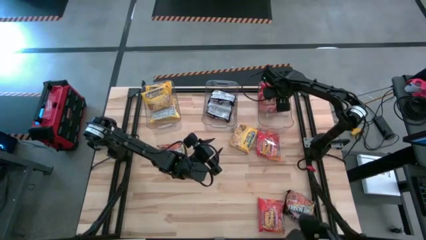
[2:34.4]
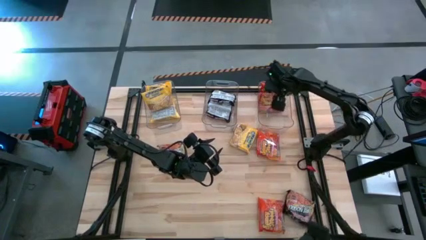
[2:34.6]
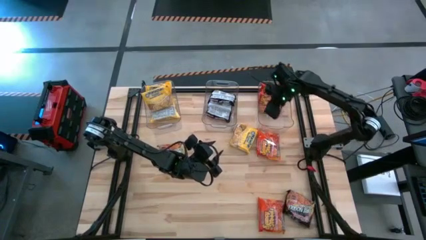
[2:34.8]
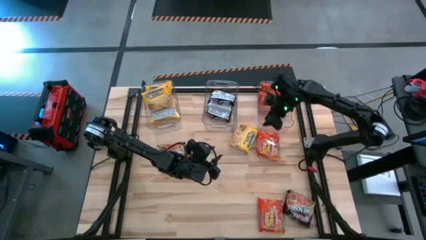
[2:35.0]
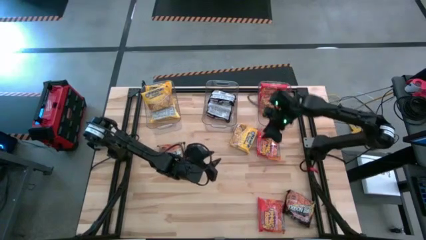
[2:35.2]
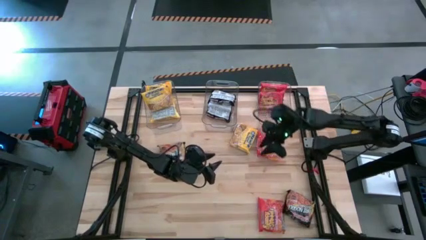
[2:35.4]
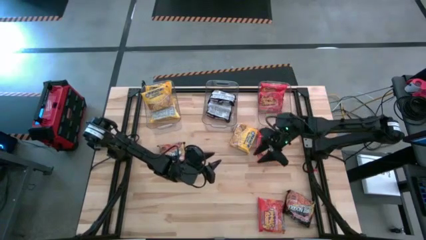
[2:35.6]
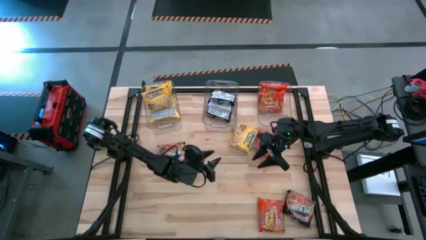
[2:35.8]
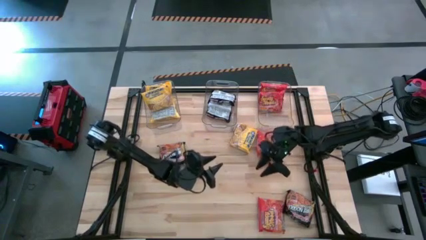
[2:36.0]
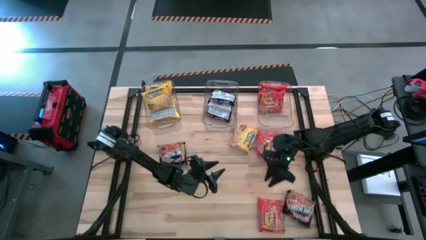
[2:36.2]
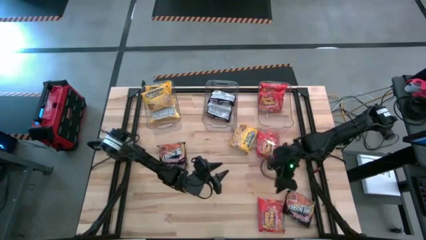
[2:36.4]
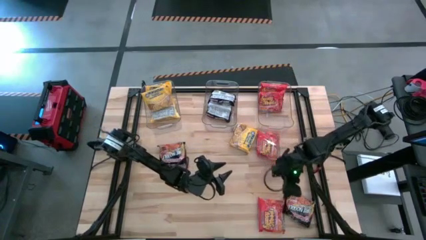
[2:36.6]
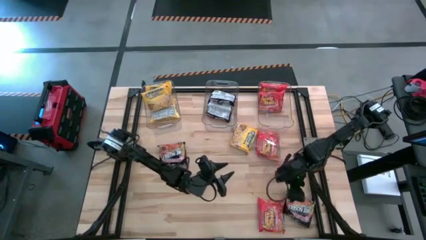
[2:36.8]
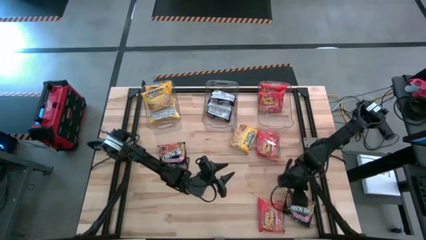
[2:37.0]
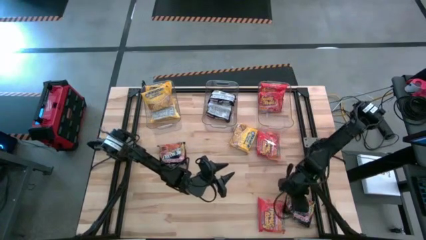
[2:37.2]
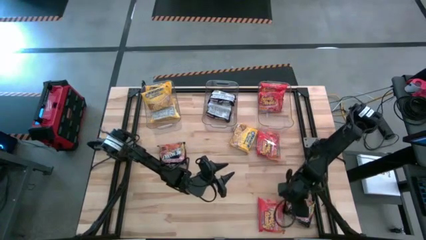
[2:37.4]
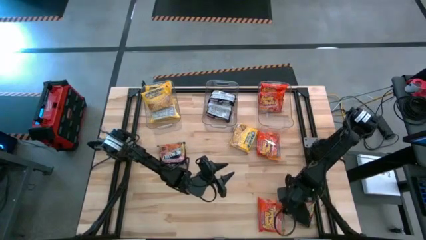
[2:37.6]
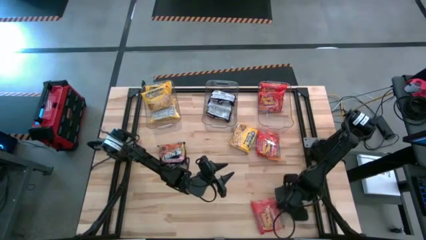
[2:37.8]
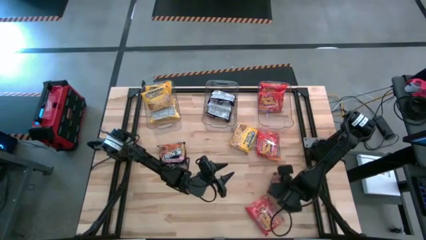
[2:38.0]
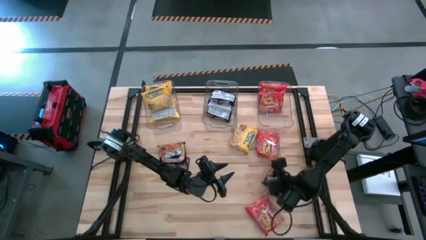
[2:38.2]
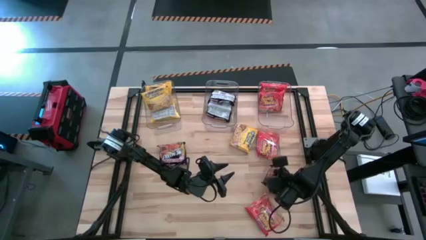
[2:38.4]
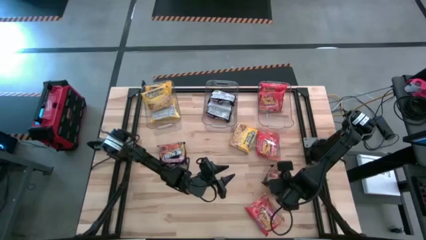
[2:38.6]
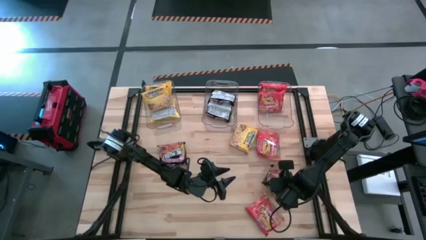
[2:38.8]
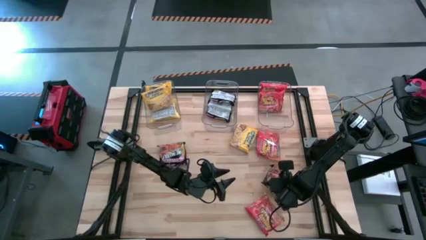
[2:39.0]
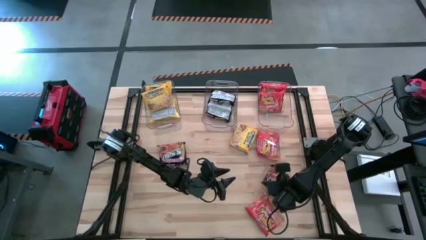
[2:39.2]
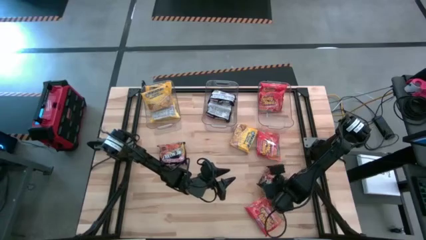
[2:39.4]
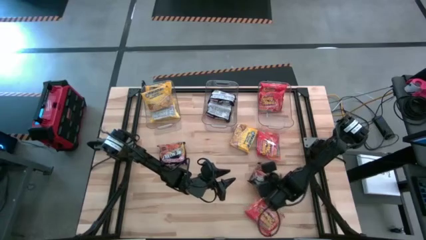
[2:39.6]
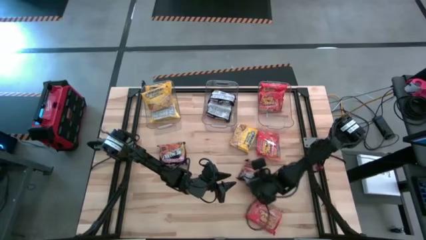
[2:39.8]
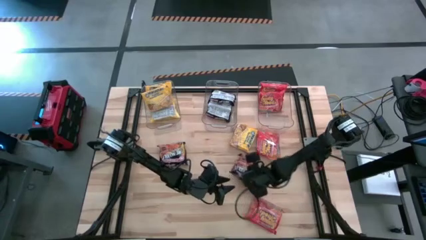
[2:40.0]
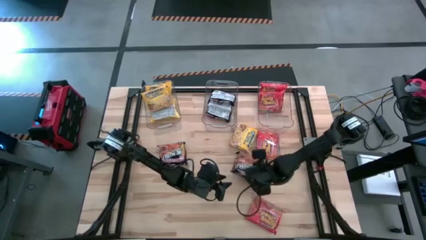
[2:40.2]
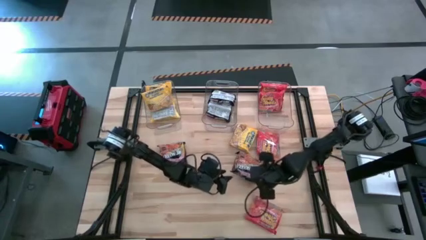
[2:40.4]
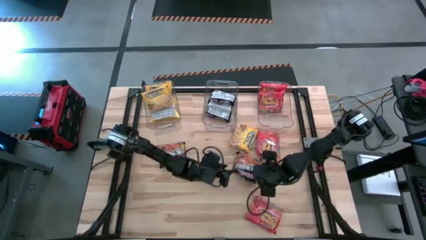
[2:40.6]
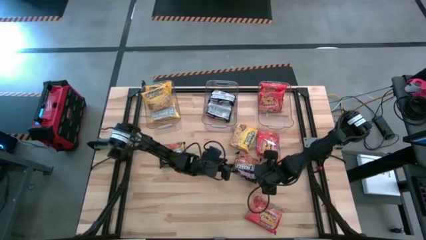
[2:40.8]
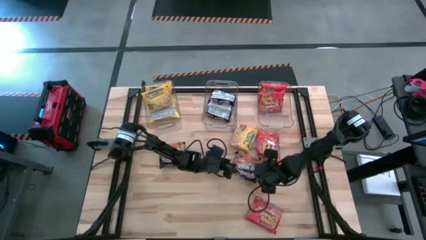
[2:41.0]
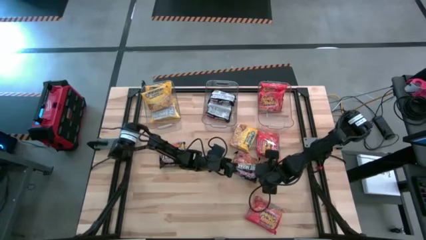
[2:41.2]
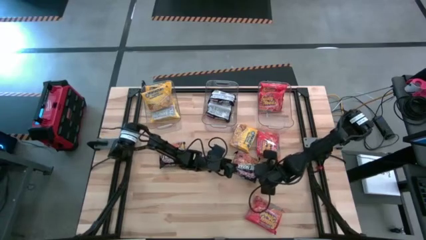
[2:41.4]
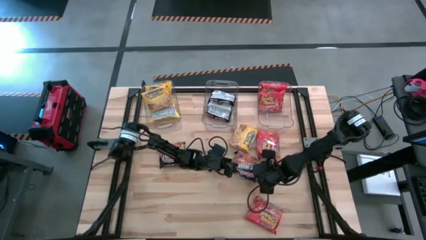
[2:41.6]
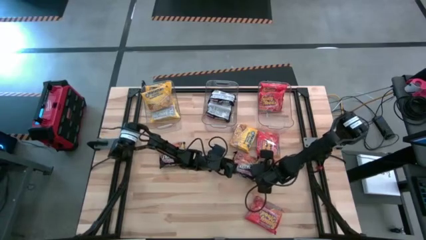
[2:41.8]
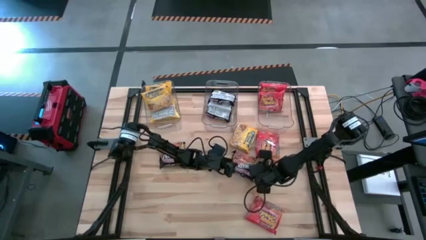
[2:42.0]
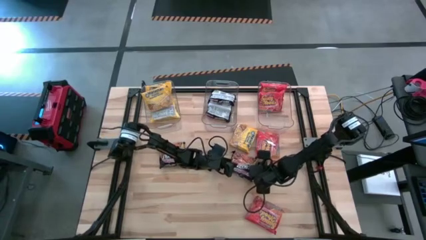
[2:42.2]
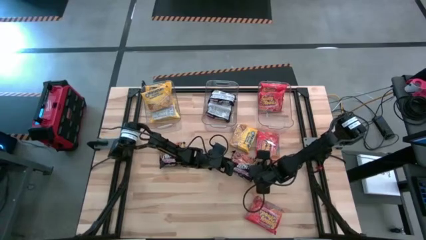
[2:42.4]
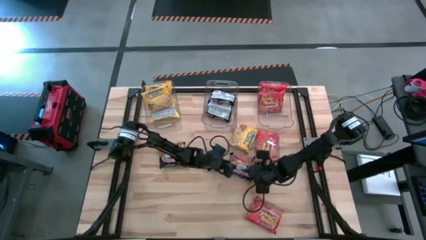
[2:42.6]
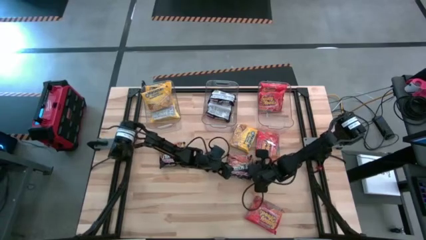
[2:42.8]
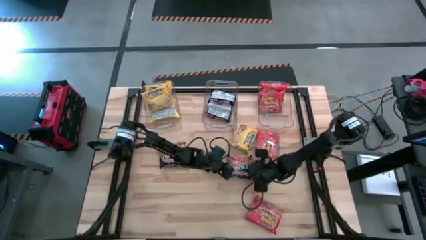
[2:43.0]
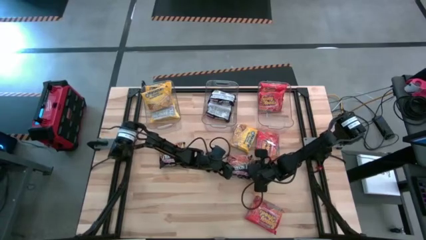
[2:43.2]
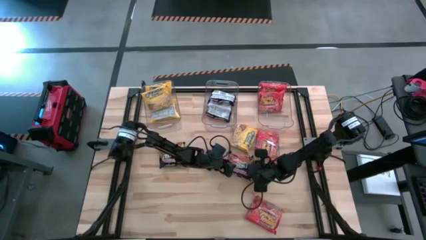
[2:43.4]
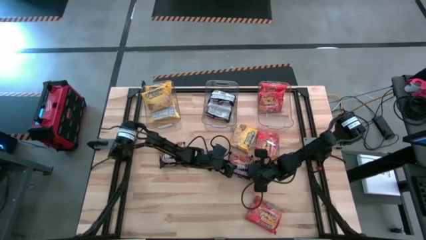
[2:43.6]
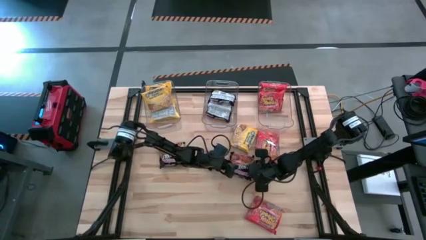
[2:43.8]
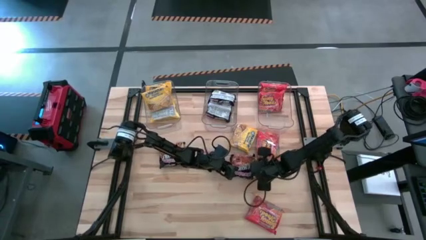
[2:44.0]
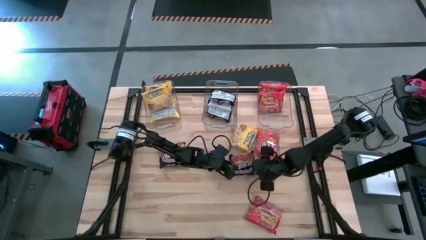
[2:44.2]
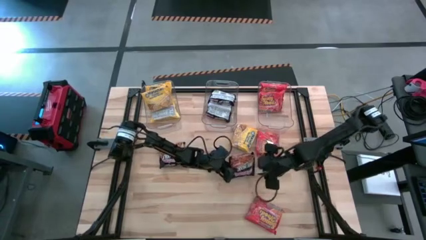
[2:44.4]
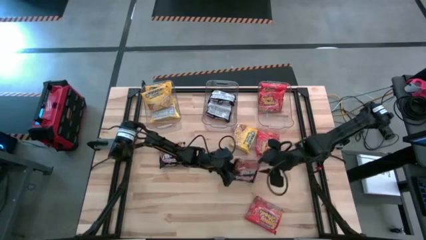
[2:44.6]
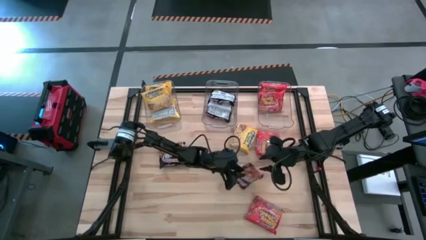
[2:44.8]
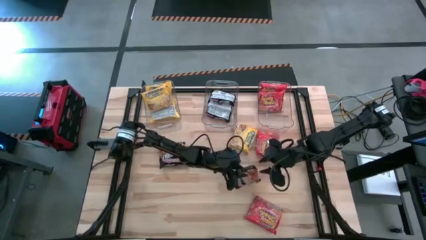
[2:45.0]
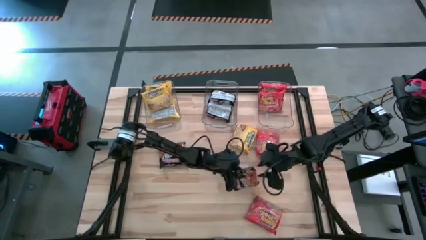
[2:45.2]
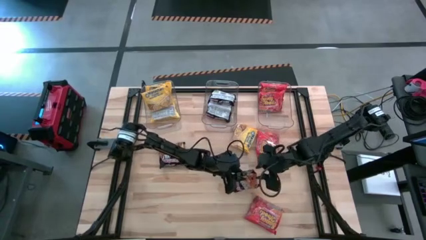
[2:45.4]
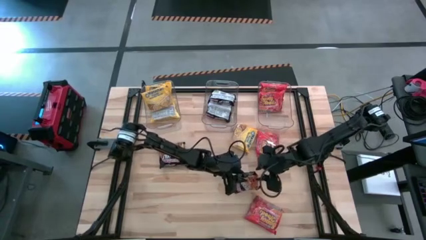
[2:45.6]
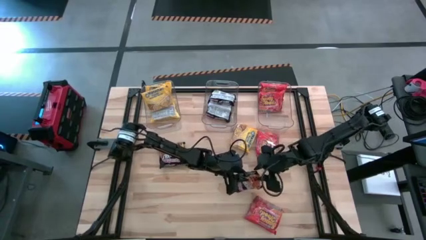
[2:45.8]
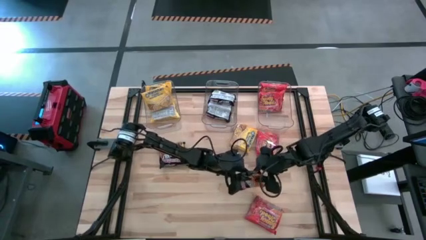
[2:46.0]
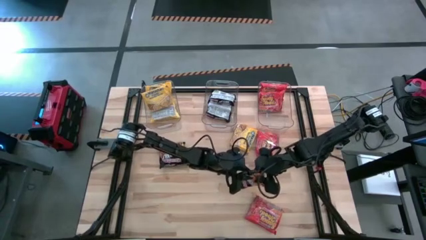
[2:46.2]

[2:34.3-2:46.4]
Task: Sort Maruchan noodles
Put the black noodle pack into the middle transparent bin
